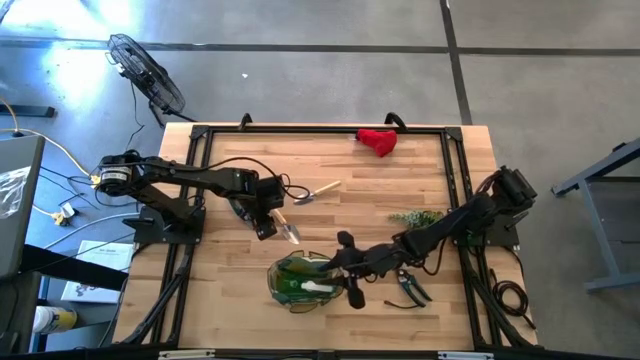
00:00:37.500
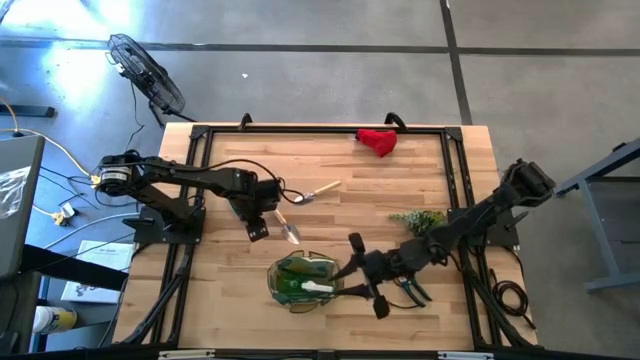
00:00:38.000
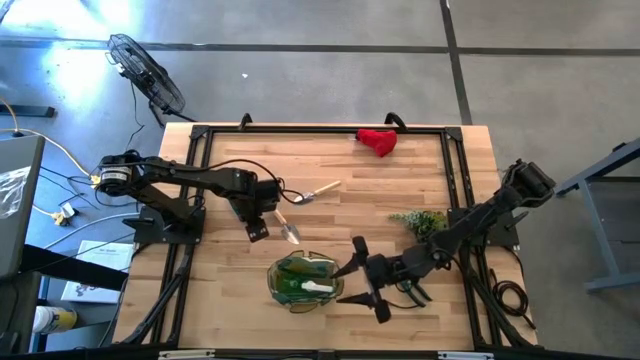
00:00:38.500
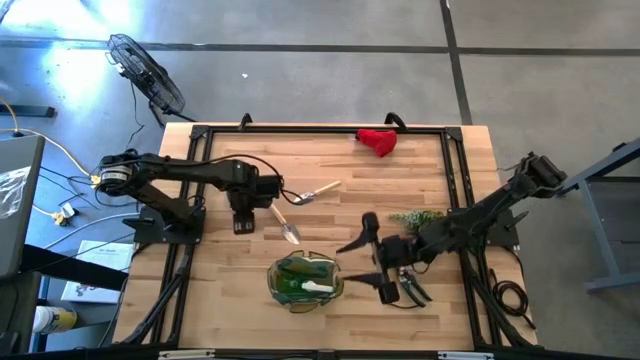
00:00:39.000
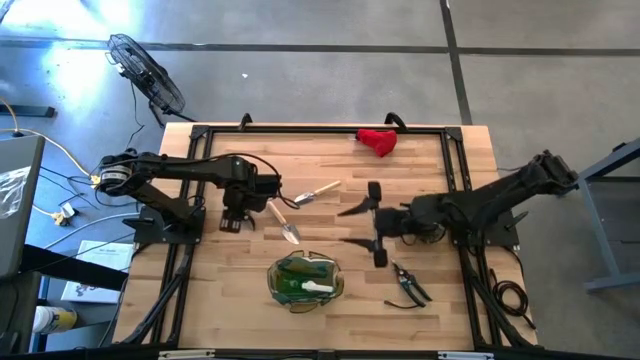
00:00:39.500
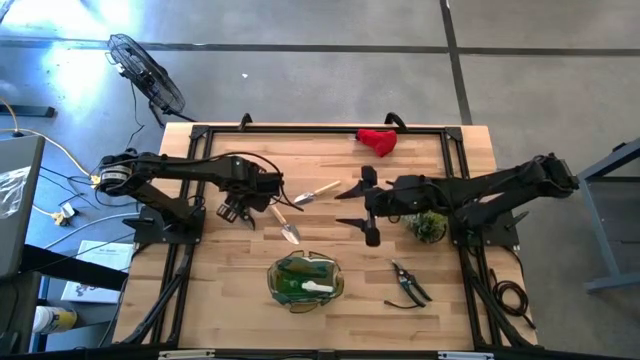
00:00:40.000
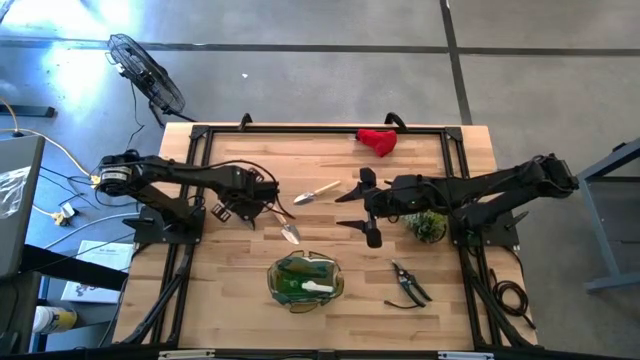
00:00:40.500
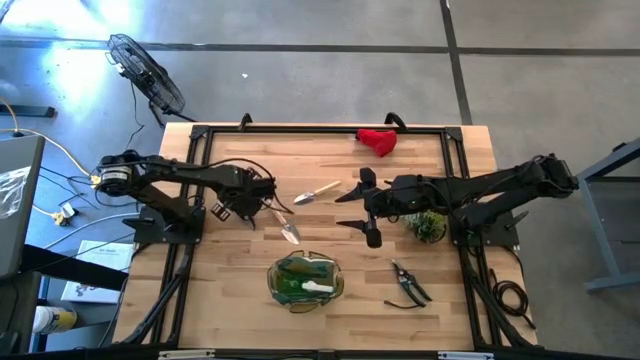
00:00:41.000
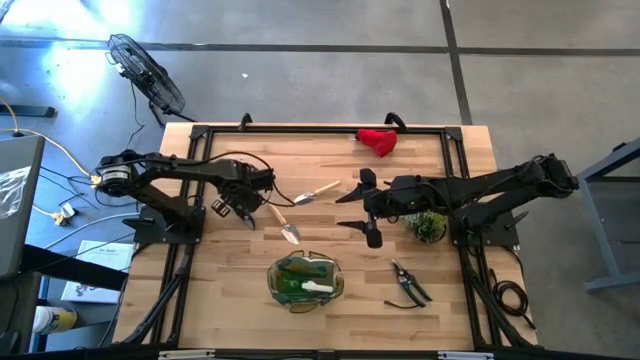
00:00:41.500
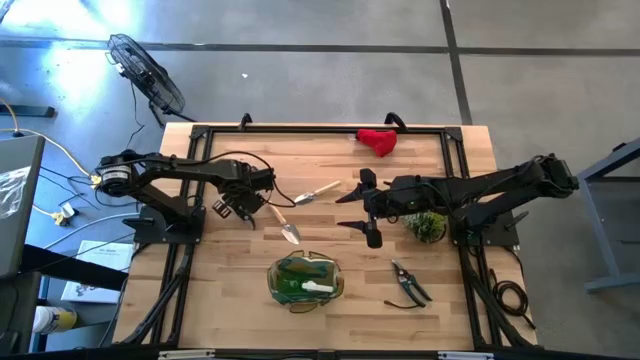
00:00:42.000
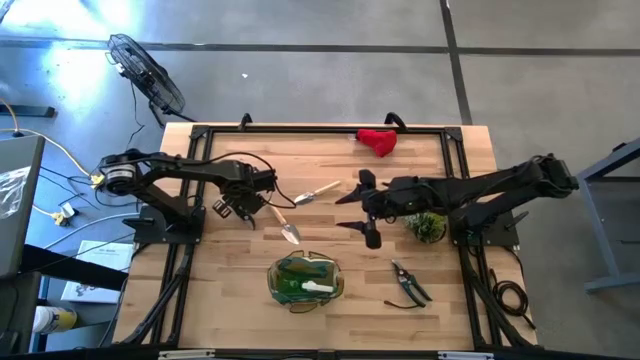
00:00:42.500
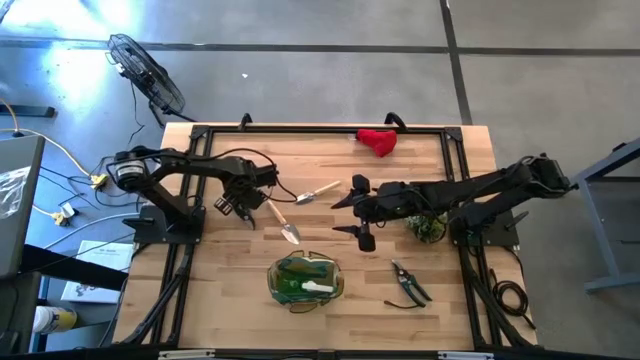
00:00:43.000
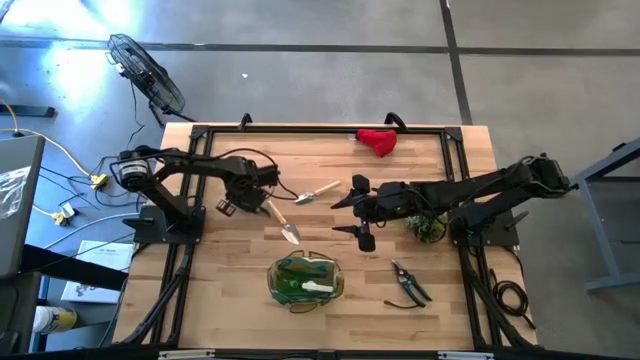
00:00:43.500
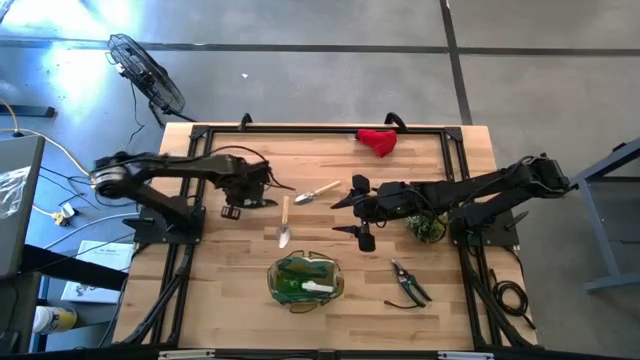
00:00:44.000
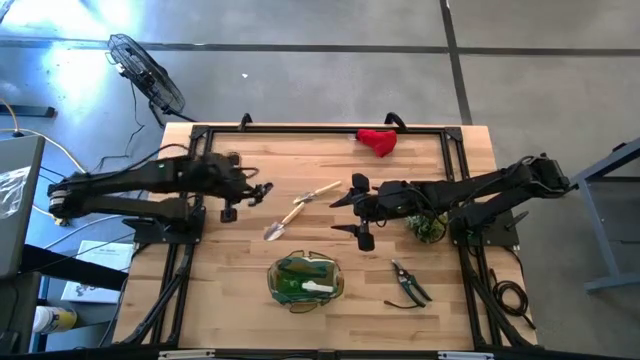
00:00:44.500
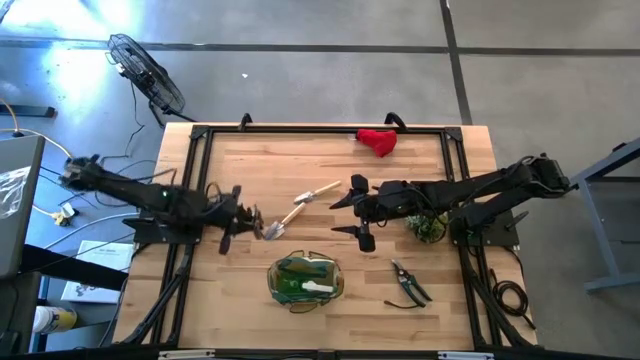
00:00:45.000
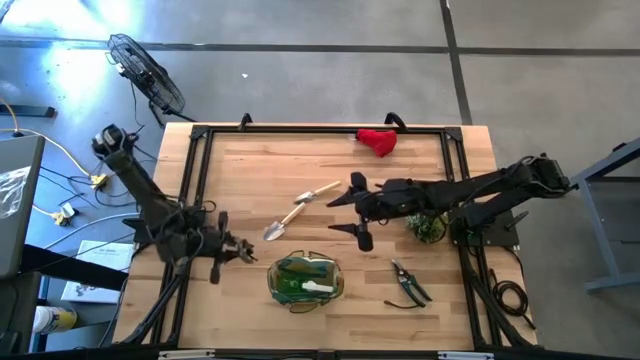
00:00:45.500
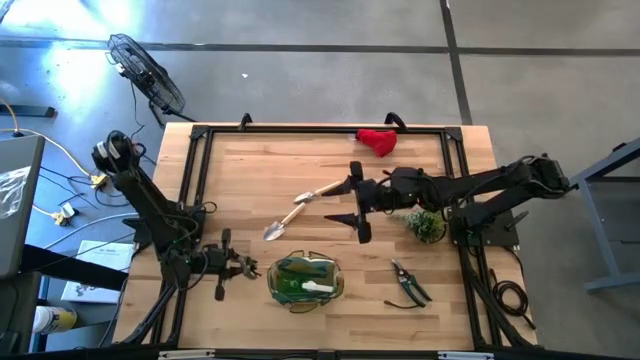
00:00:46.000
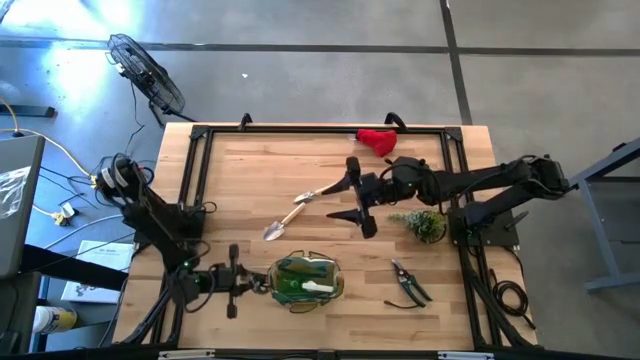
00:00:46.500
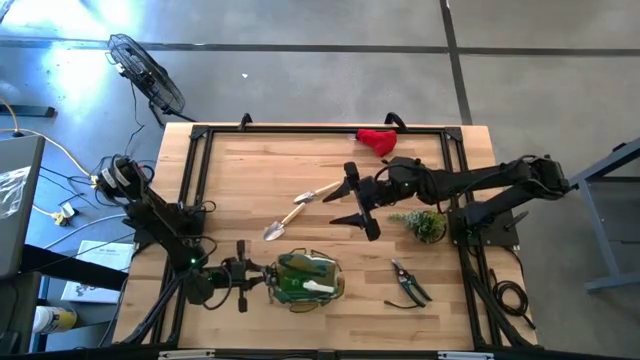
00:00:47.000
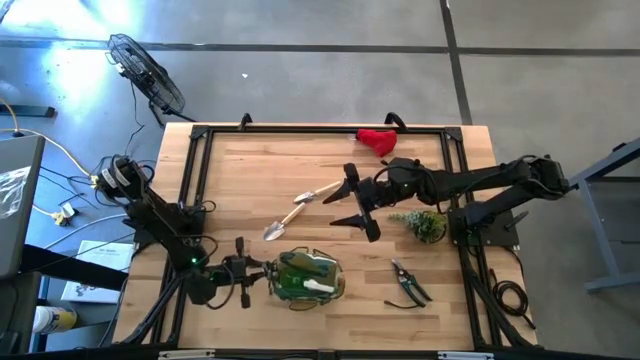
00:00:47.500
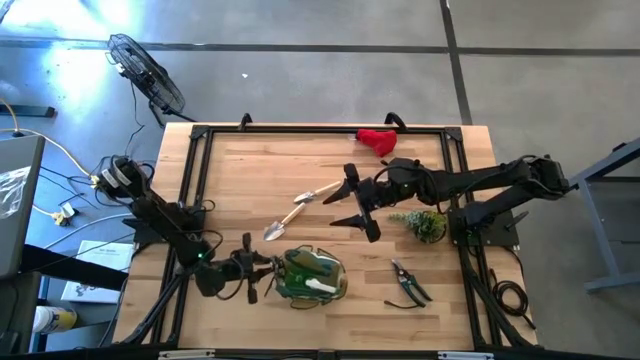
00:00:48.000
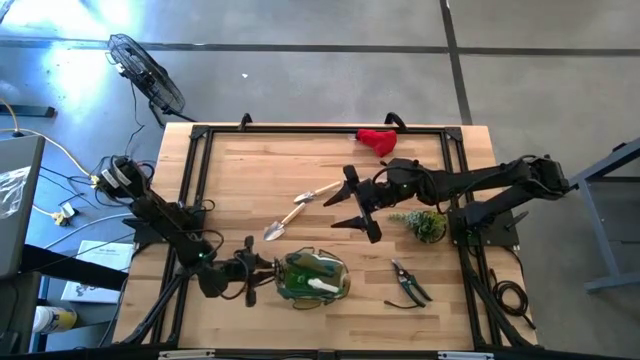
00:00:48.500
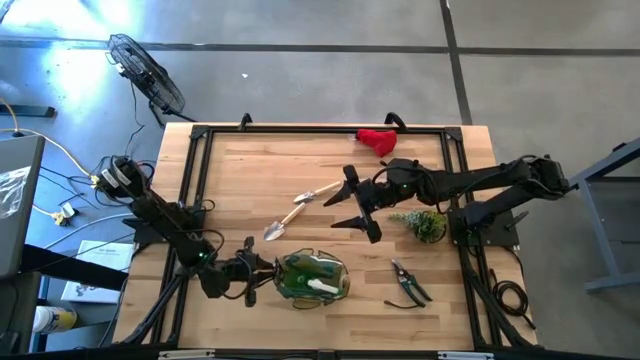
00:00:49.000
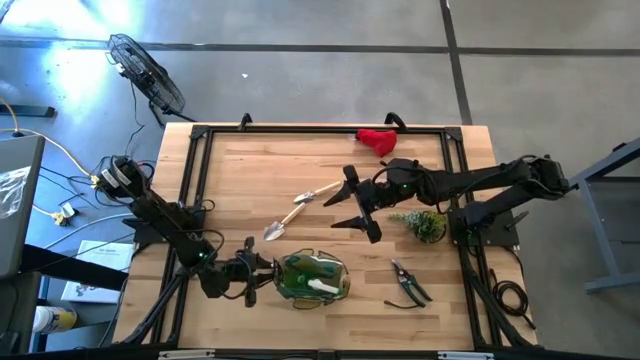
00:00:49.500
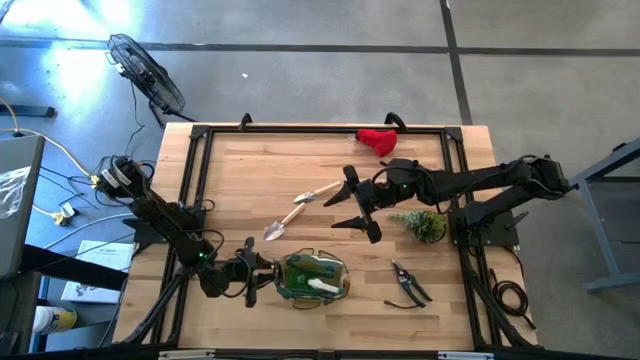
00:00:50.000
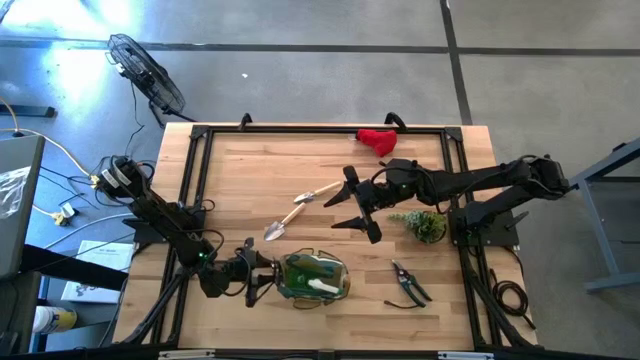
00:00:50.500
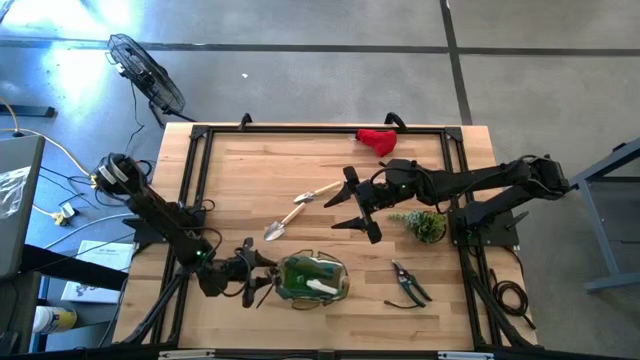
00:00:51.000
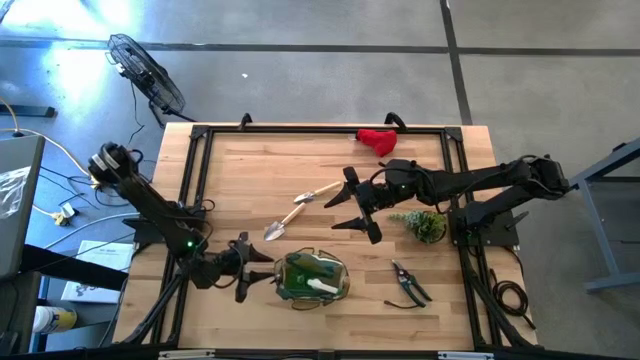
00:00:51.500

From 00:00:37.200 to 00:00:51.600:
Task: Pick & Place Garden tools in Gardening bag
Put the top green shear scissors into the gardening bag

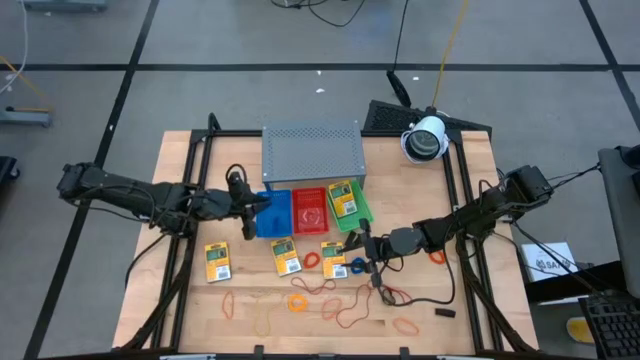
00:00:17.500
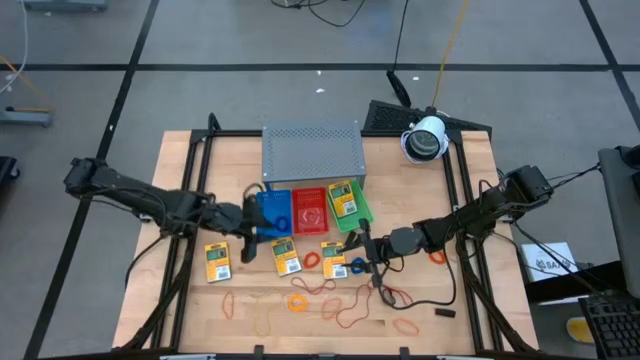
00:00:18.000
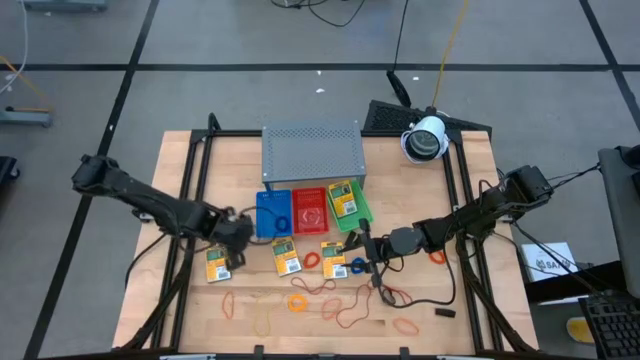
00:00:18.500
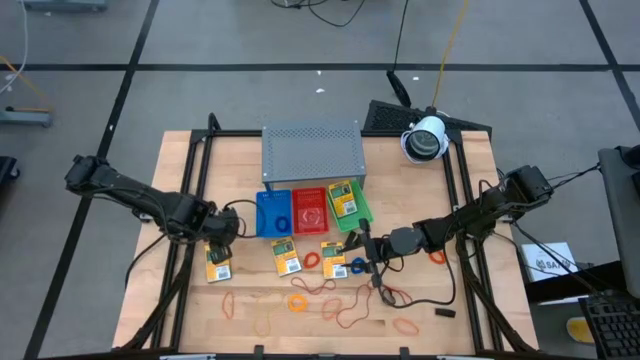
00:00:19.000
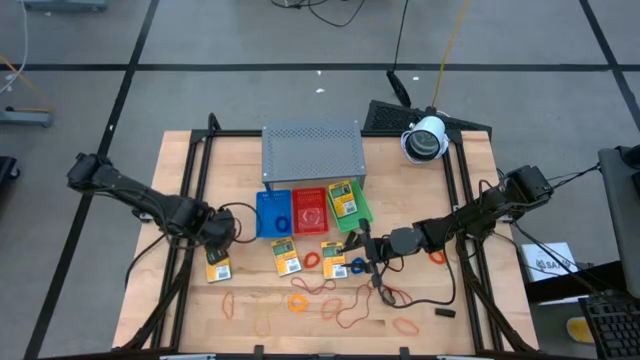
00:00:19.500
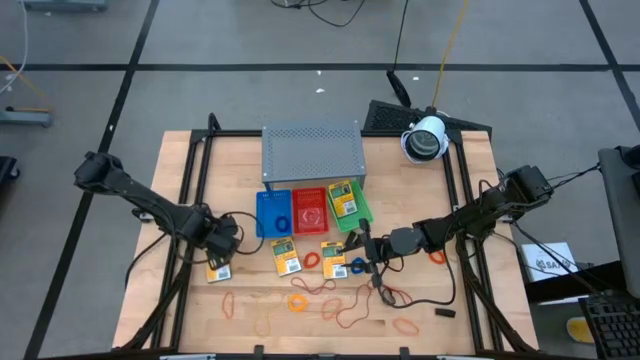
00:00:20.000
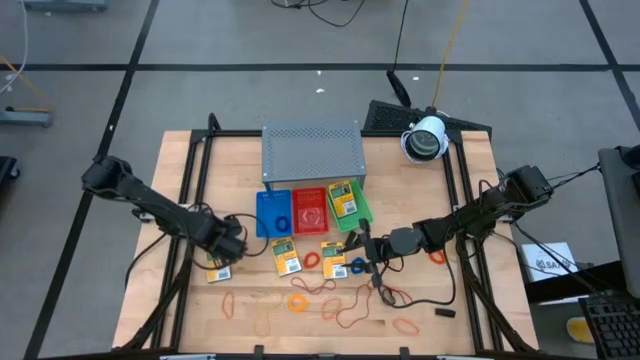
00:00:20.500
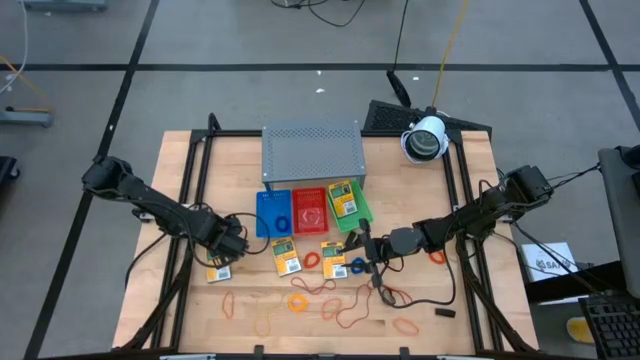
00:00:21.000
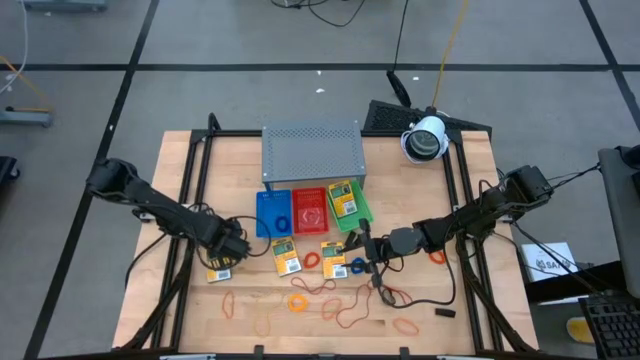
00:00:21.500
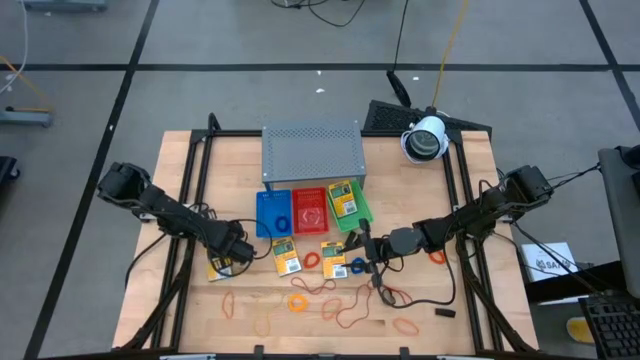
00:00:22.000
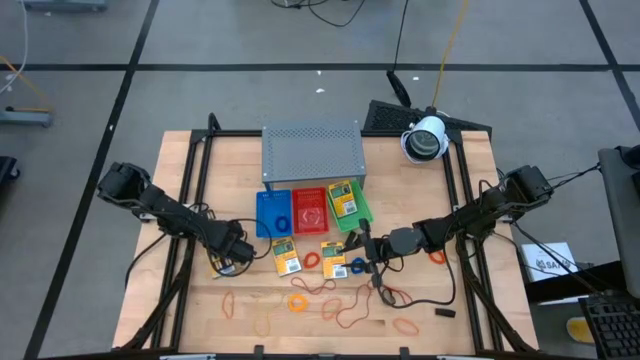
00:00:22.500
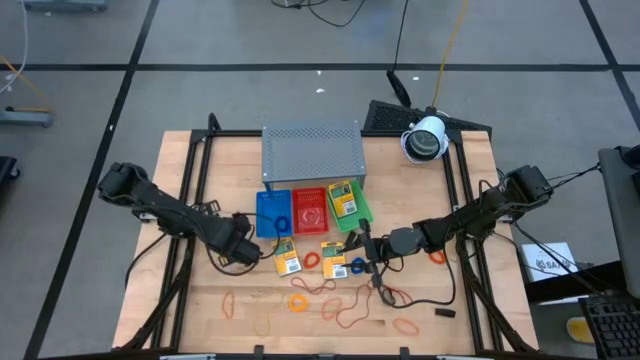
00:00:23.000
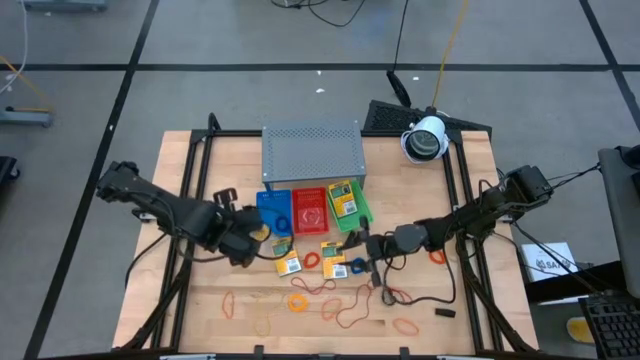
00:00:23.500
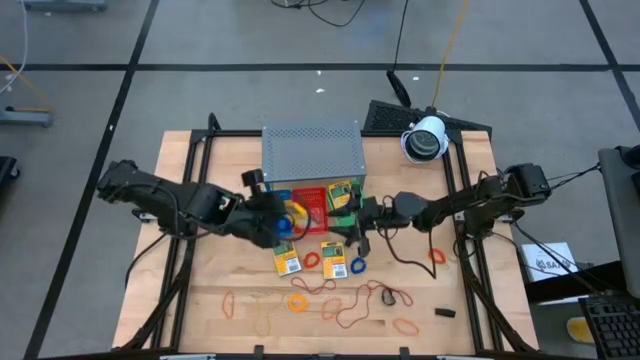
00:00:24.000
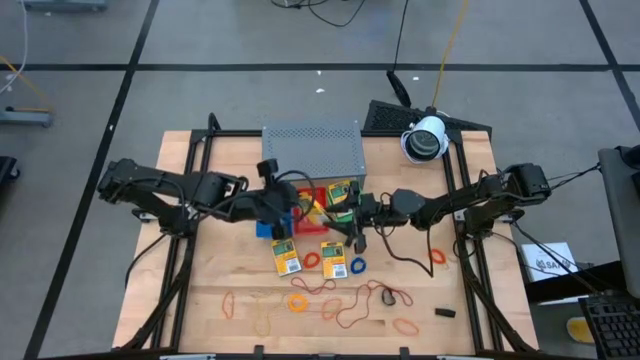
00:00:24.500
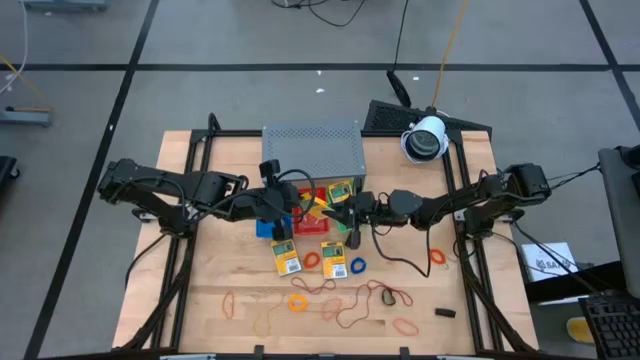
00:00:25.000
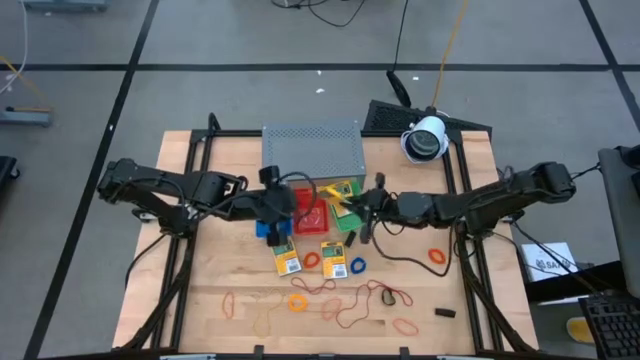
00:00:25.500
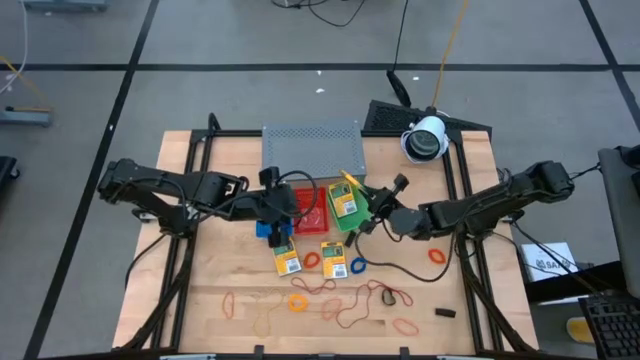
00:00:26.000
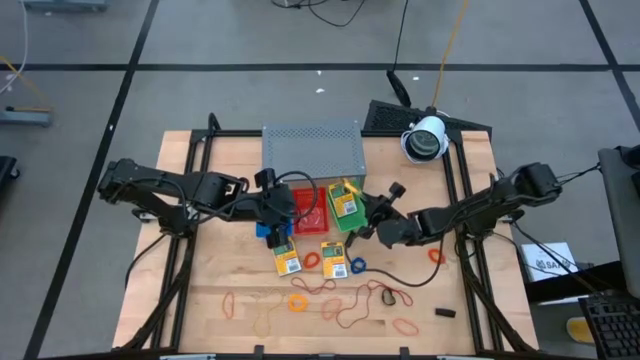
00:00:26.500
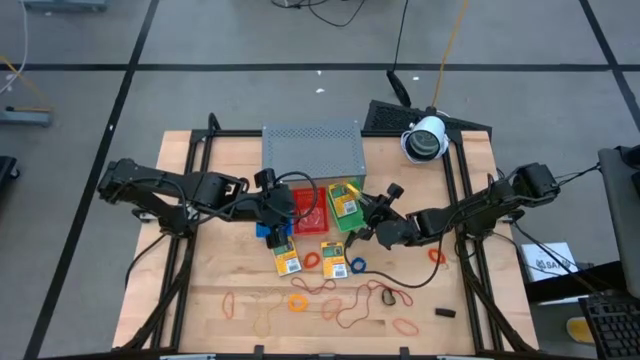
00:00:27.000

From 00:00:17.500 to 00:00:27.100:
Task: Pick & Place Office Desk Supplies
Put the crayon pack into the green bin
